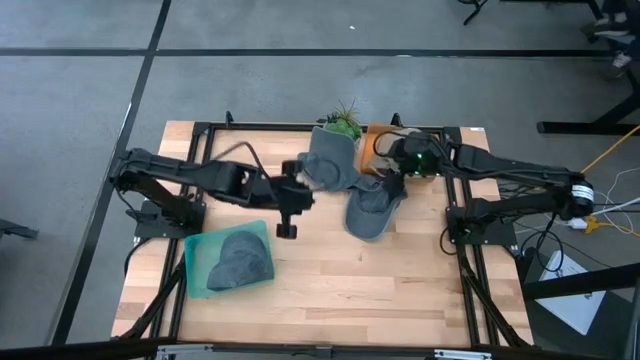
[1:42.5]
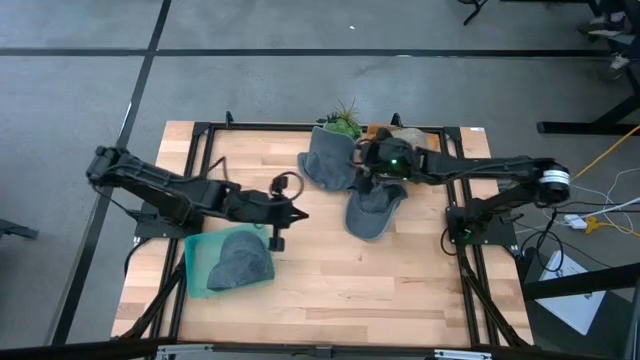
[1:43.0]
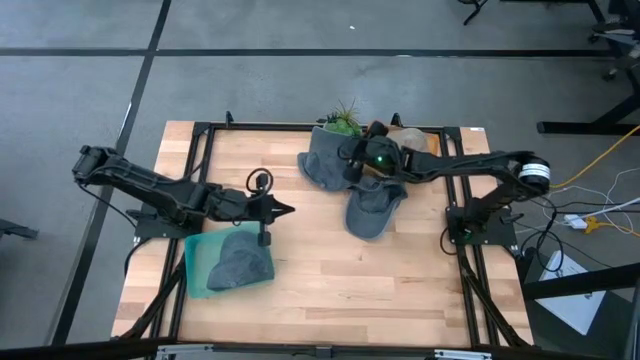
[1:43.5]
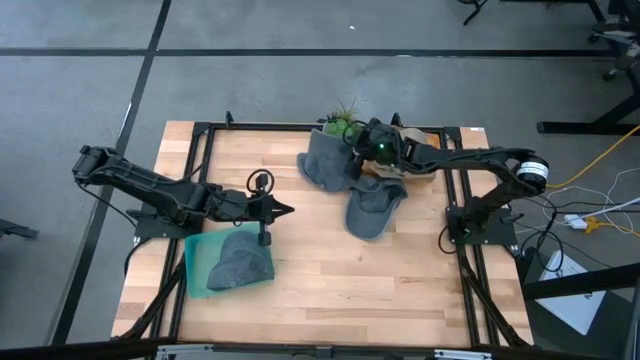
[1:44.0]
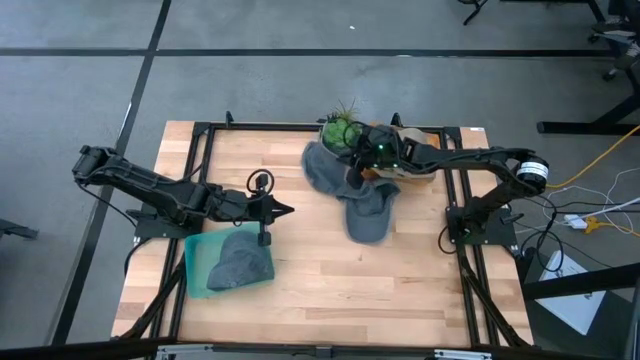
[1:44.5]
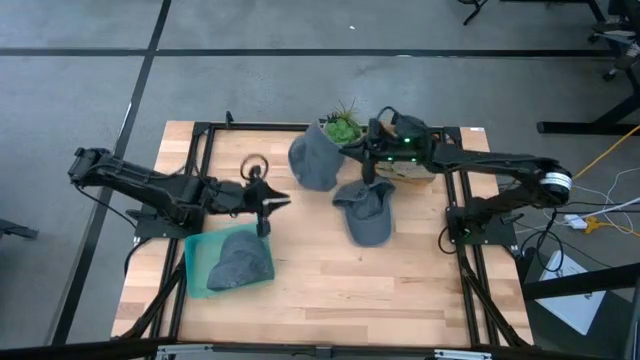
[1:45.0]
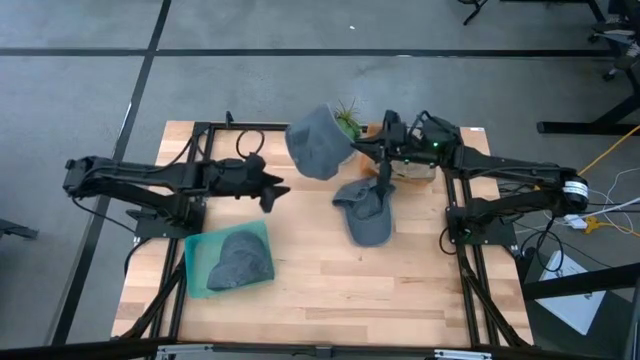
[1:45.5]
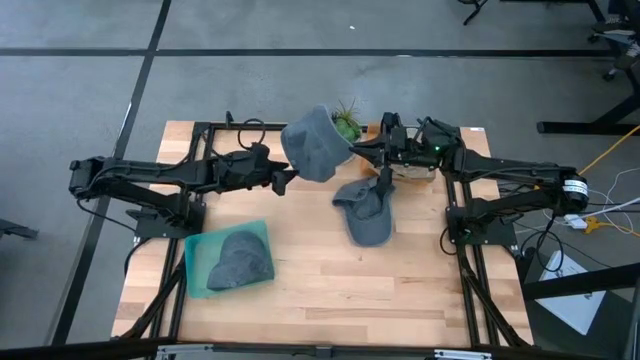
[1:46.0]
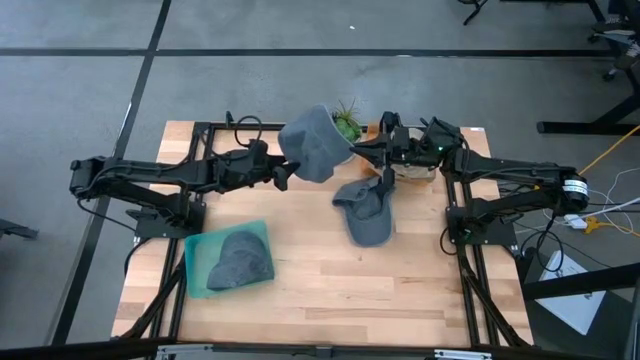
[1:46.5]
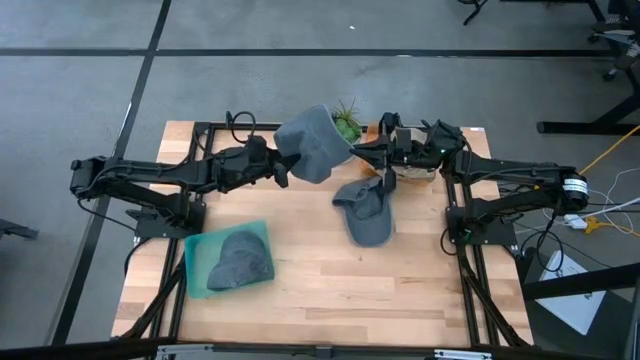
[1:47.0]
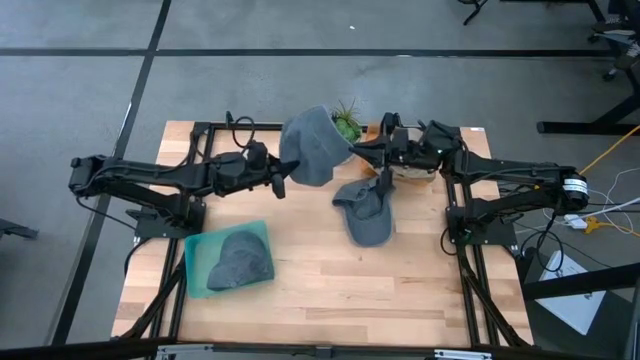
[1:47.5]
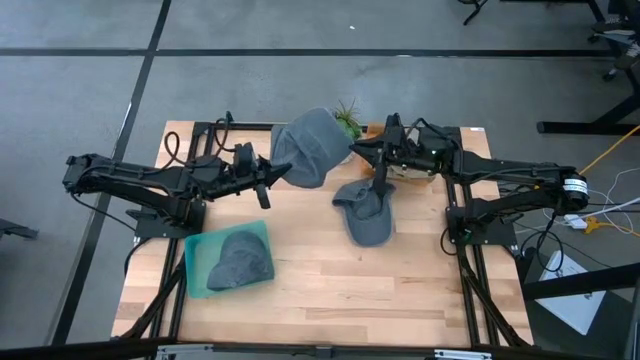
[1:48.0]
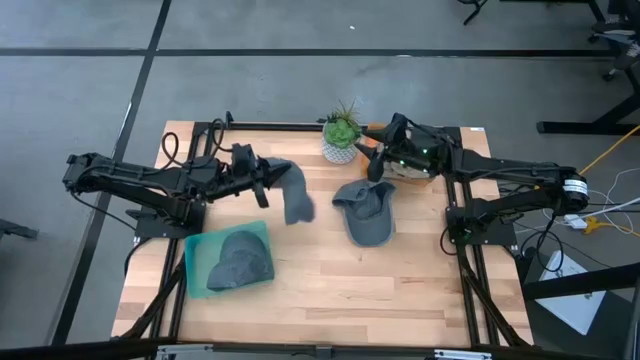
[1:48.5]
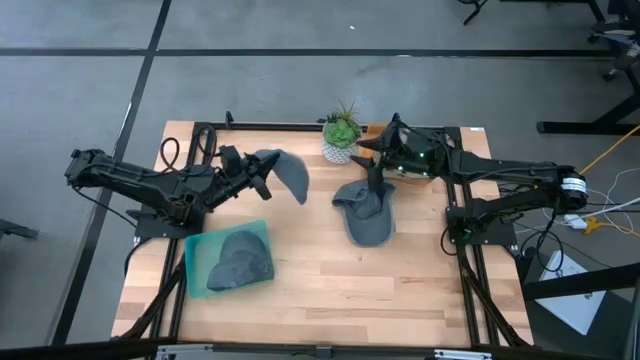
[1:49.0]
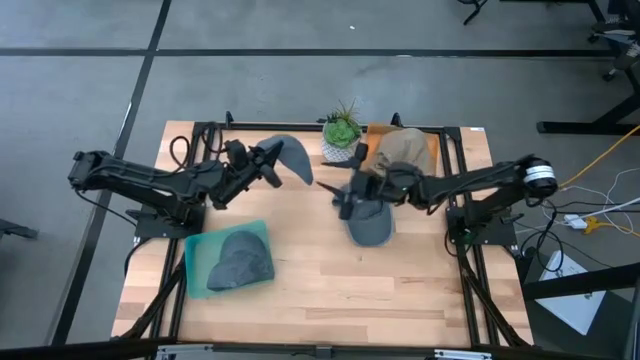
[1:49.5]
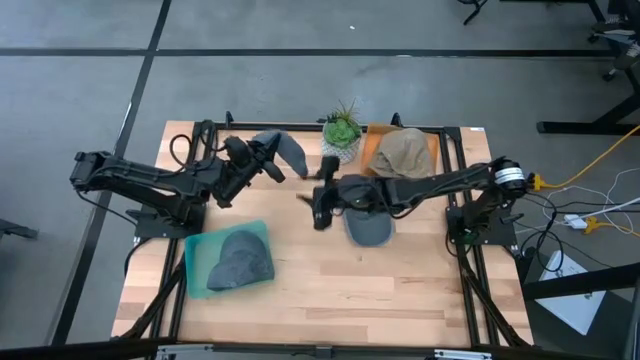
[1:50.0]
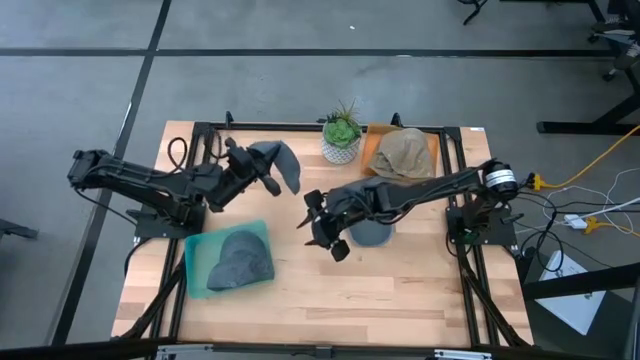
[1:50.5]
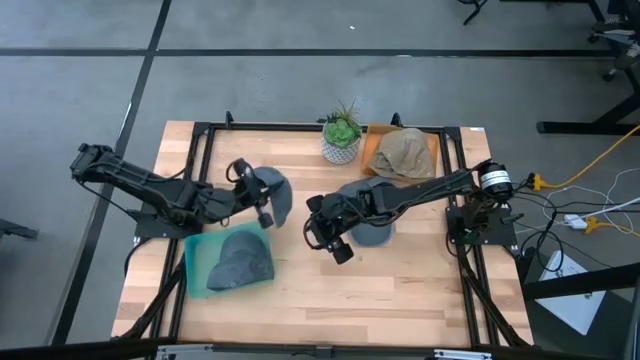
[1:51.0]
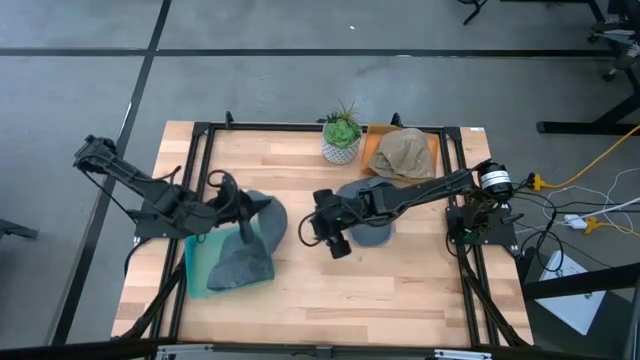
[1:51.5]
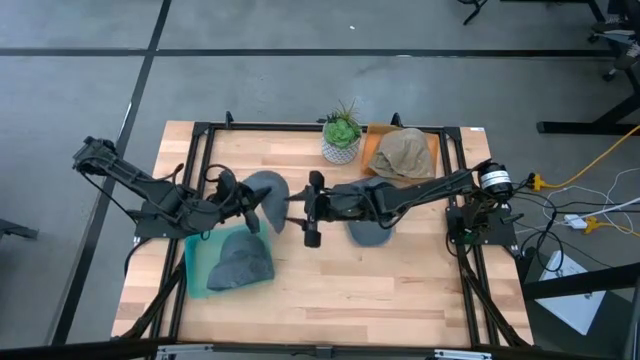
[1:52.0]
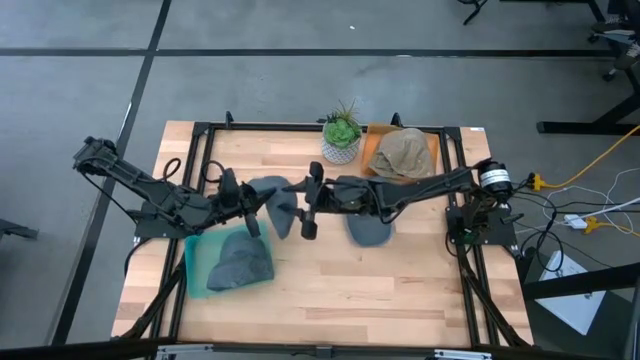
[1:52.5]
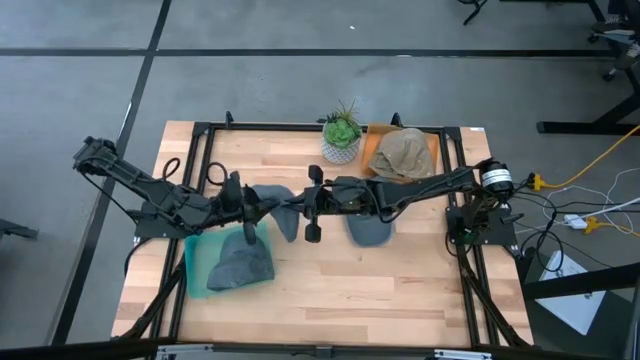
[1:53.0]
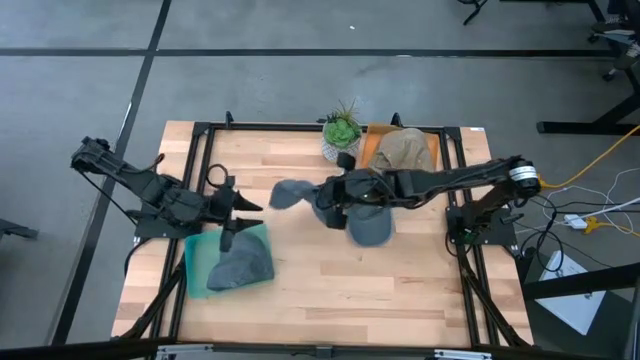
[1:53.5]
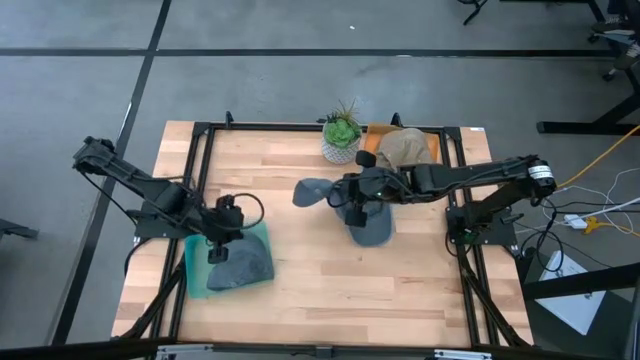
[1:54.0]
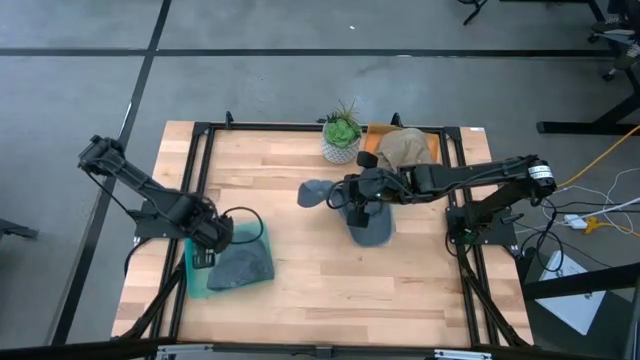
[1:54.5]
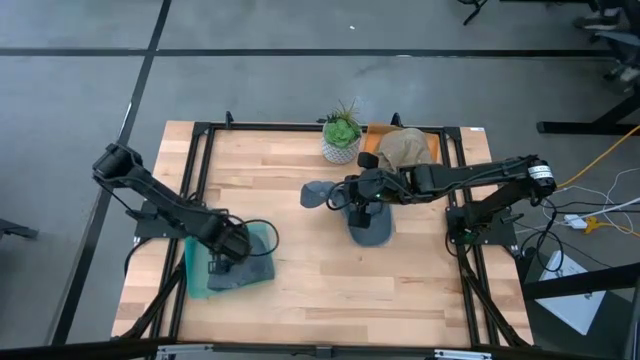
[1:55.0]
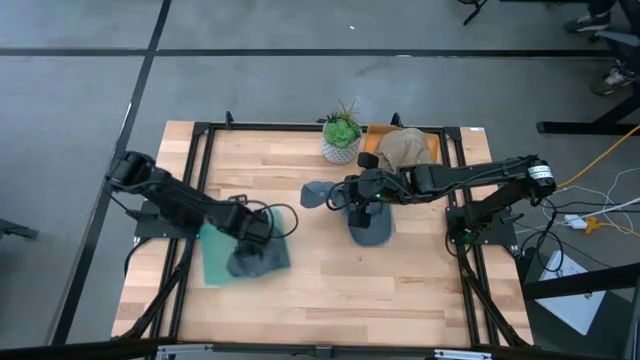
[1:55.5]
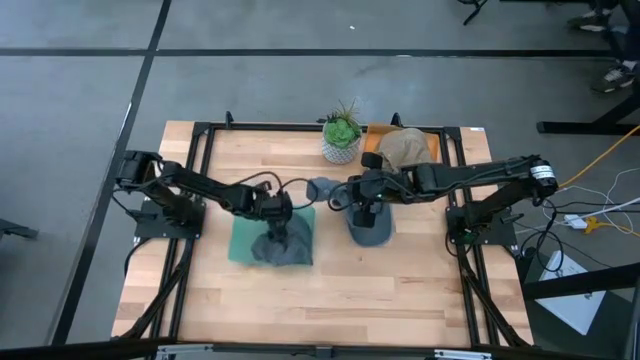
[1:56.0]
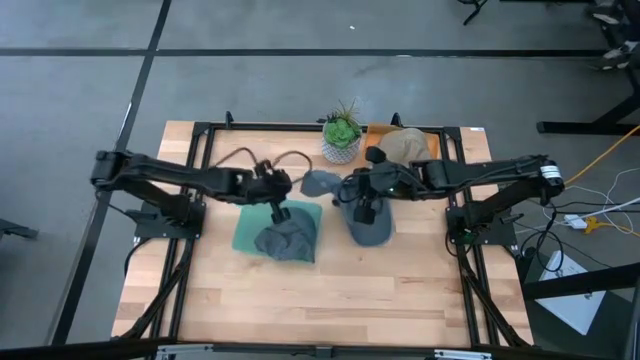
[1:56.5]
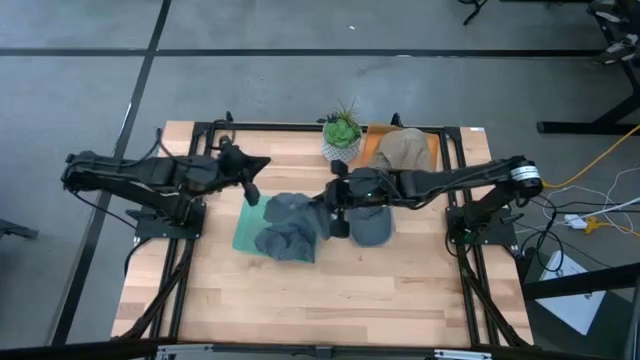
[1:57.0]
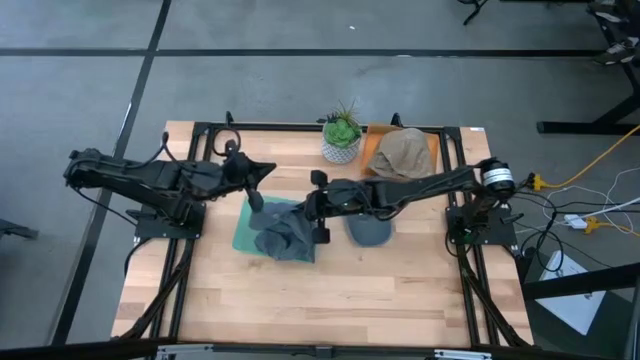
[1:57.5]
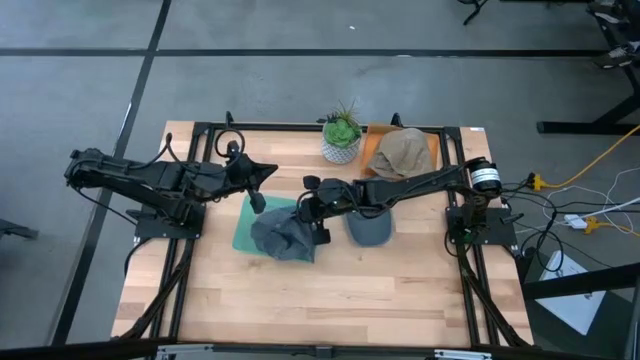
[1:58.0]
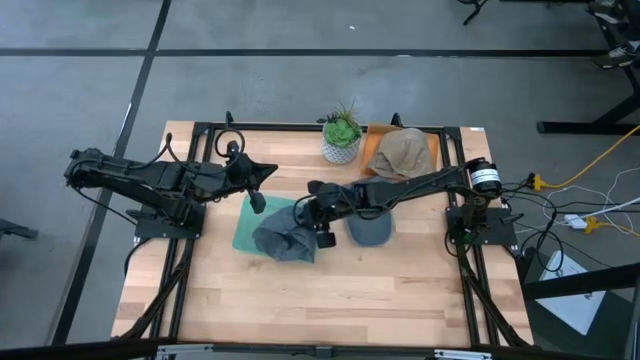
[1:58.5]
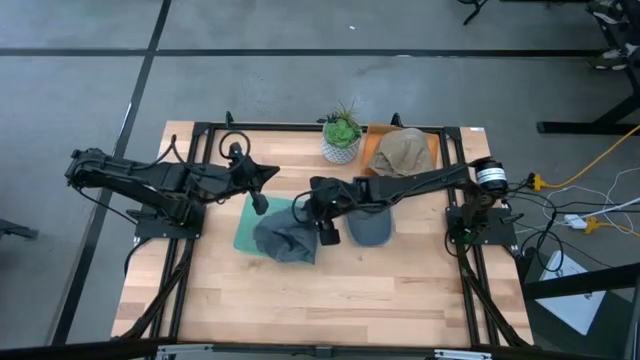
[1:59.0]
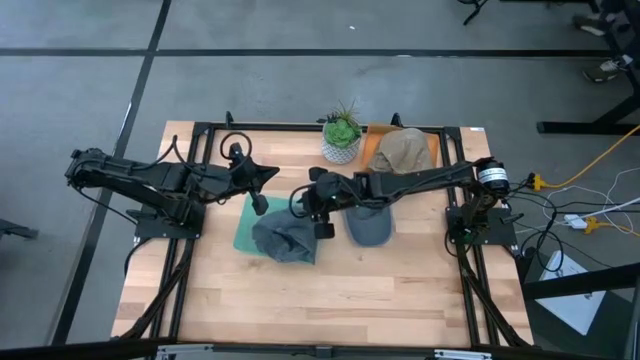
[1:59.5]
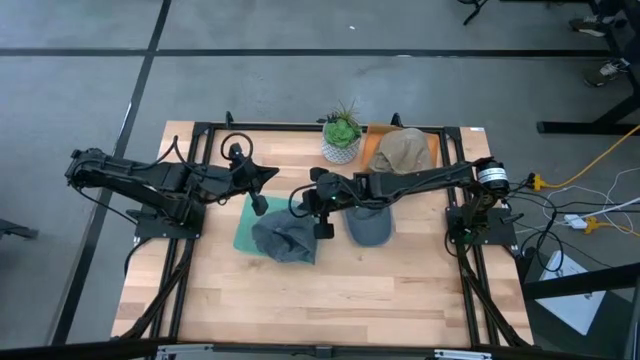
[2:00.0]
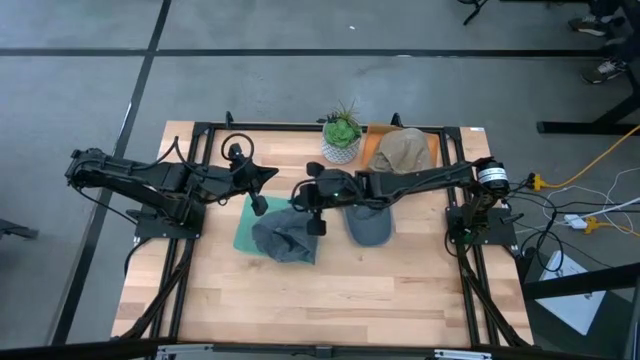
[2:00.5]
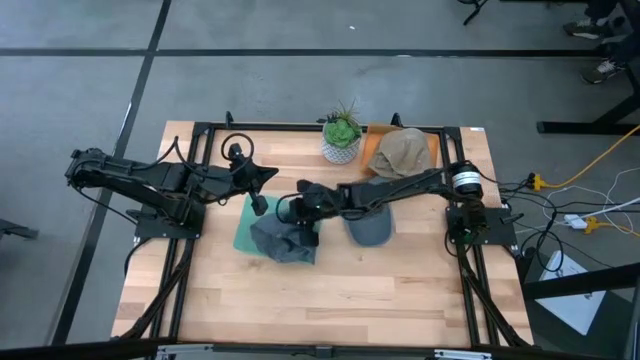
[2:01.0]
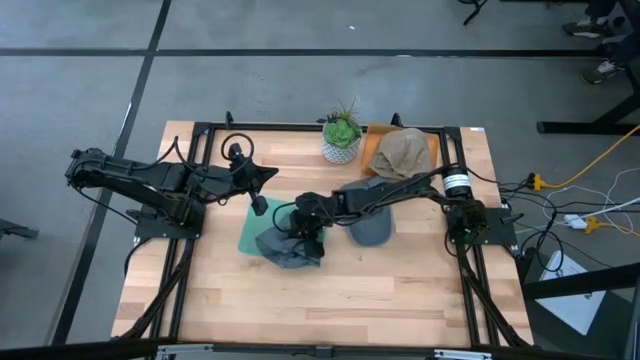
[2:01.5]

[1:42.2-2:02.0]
Task: Pick & Place hat
Put the top blue cap into the green bin
